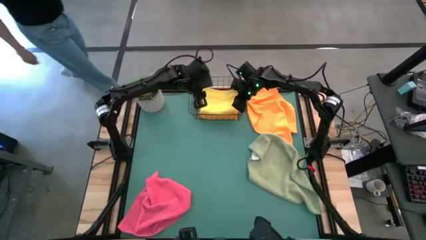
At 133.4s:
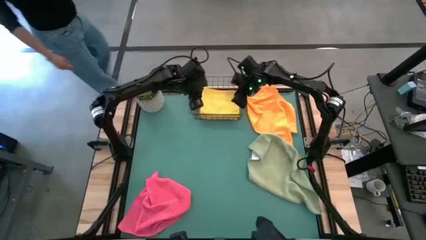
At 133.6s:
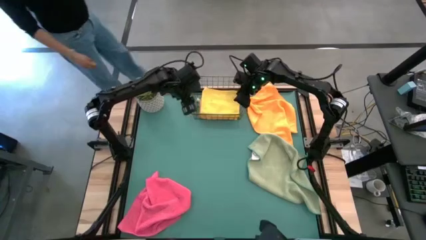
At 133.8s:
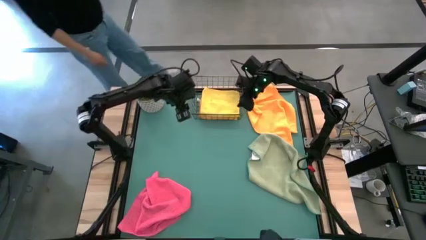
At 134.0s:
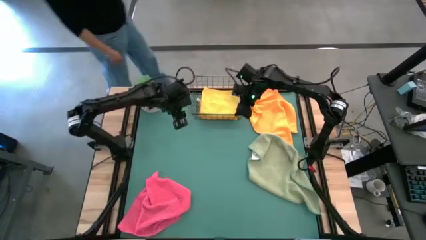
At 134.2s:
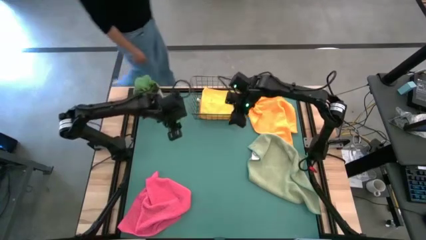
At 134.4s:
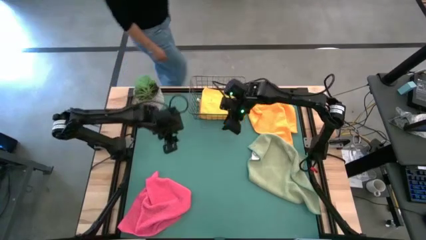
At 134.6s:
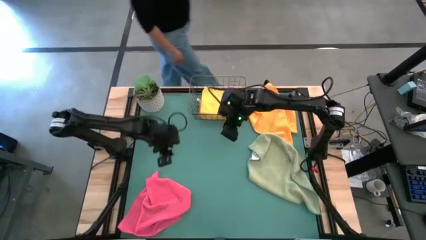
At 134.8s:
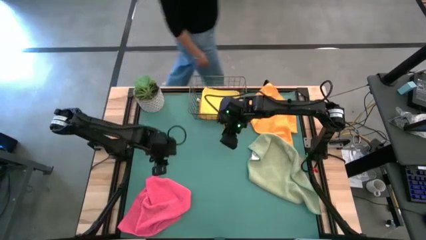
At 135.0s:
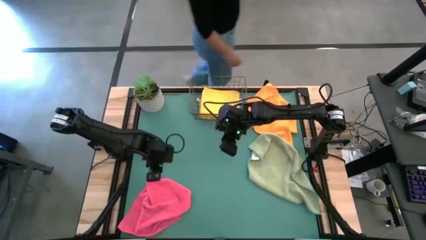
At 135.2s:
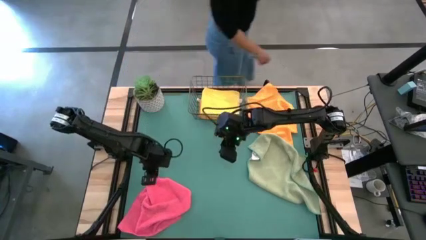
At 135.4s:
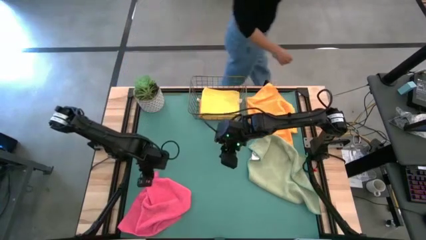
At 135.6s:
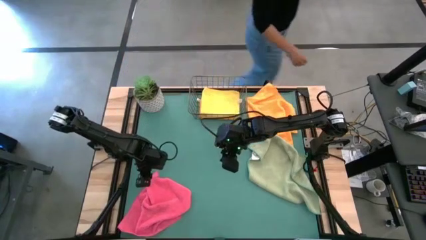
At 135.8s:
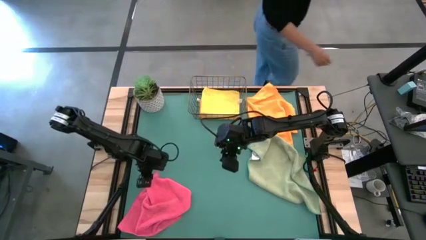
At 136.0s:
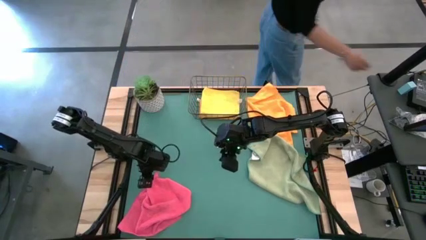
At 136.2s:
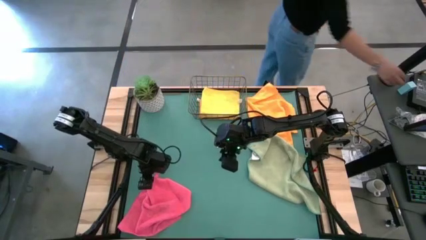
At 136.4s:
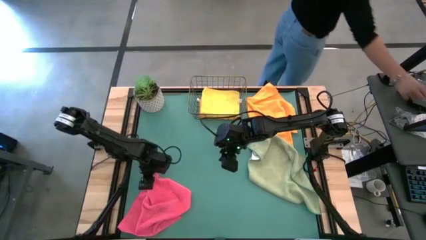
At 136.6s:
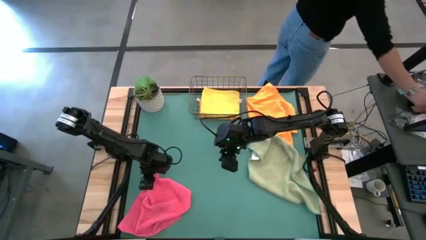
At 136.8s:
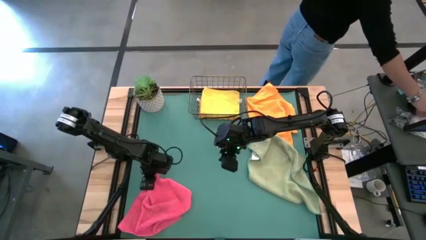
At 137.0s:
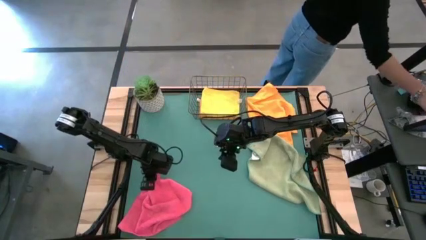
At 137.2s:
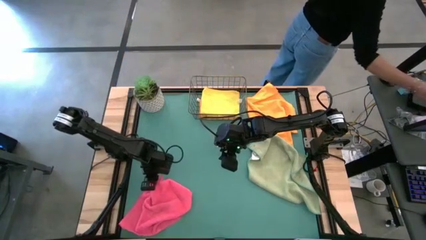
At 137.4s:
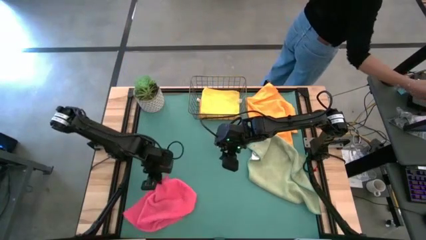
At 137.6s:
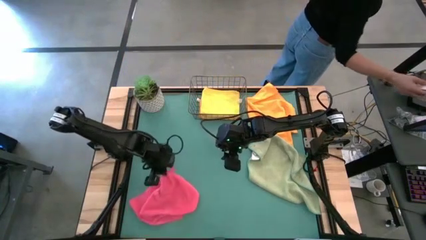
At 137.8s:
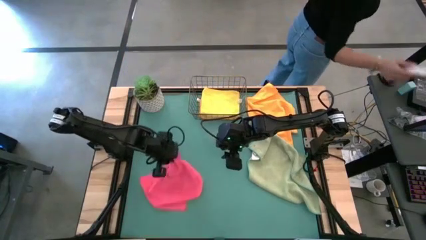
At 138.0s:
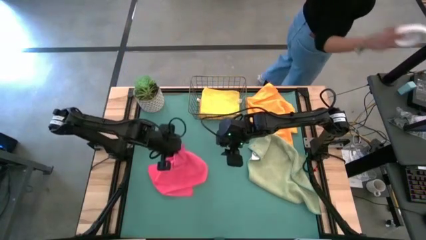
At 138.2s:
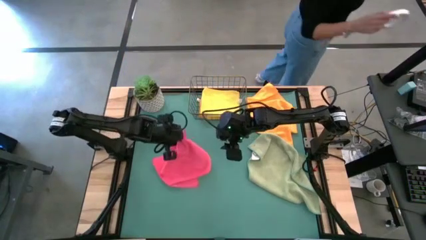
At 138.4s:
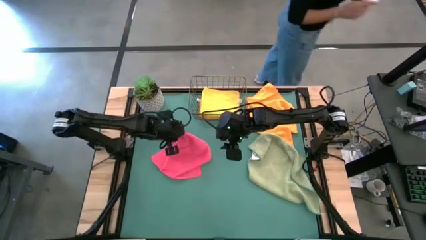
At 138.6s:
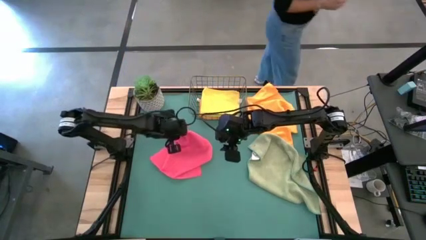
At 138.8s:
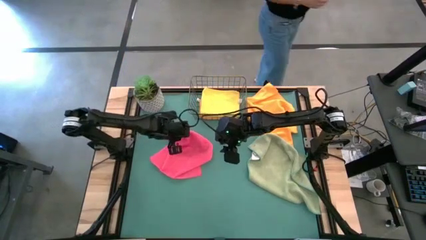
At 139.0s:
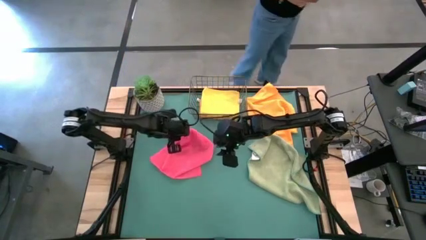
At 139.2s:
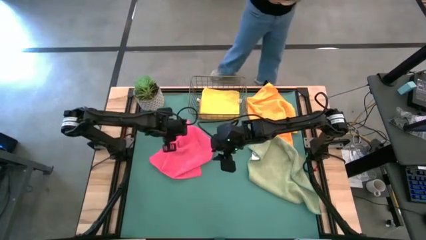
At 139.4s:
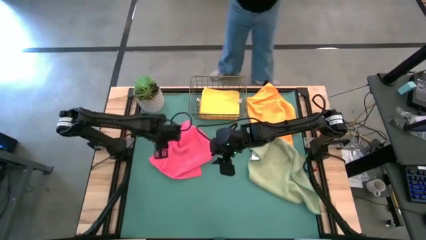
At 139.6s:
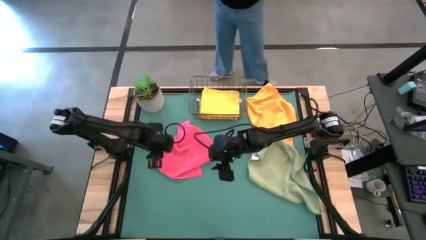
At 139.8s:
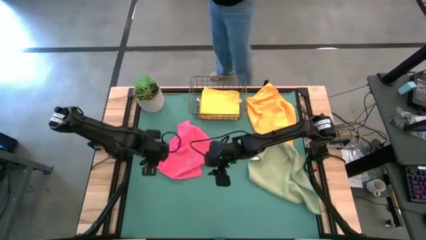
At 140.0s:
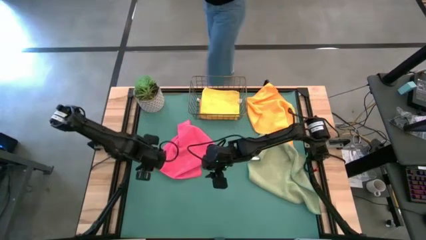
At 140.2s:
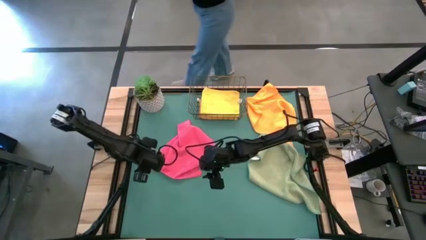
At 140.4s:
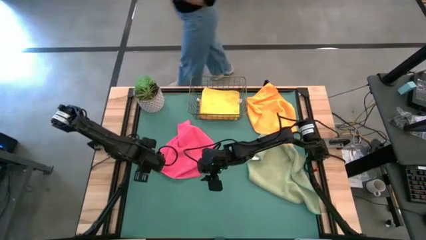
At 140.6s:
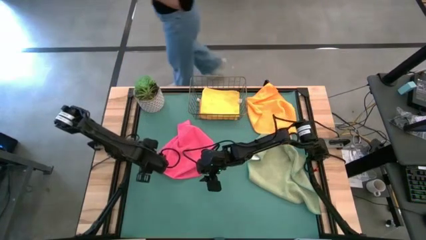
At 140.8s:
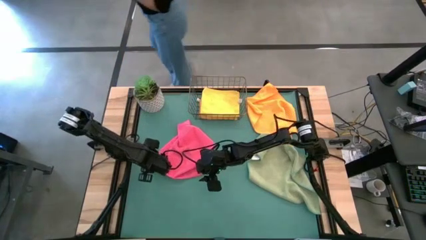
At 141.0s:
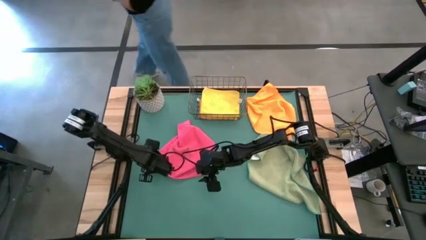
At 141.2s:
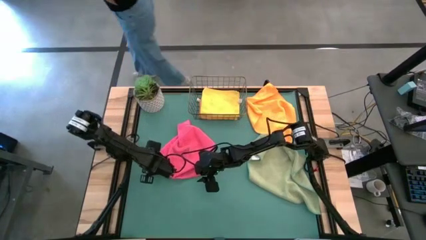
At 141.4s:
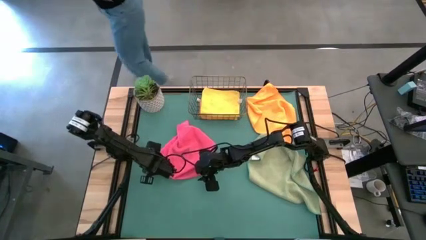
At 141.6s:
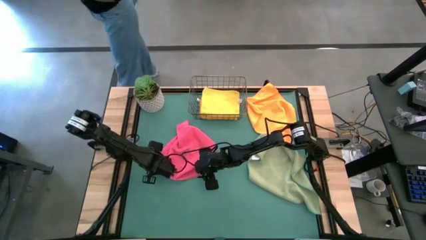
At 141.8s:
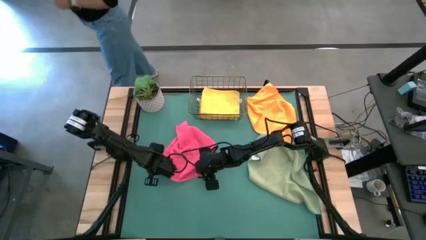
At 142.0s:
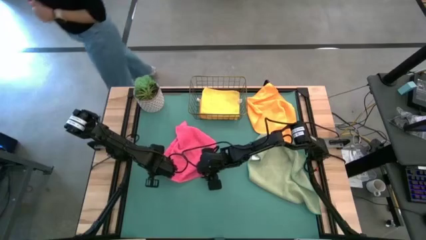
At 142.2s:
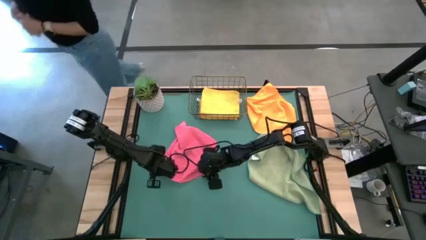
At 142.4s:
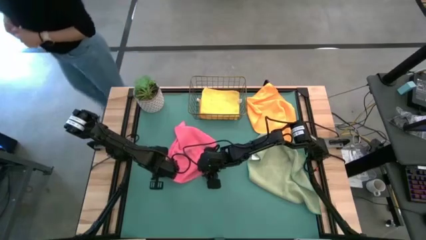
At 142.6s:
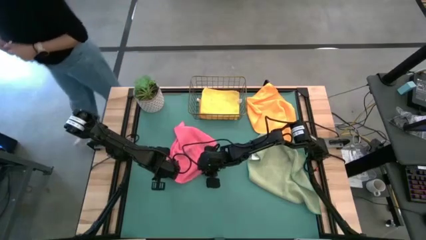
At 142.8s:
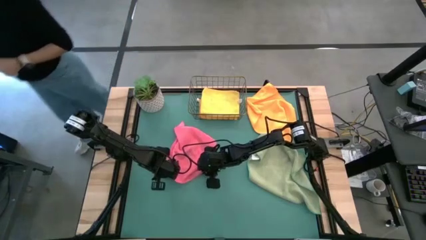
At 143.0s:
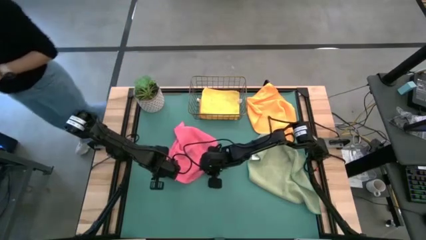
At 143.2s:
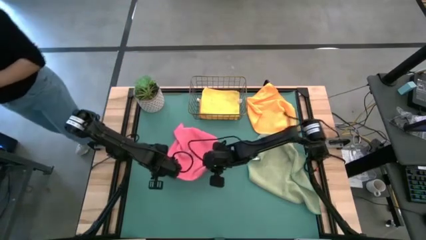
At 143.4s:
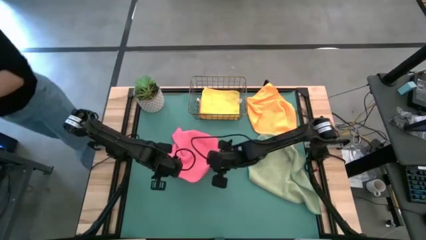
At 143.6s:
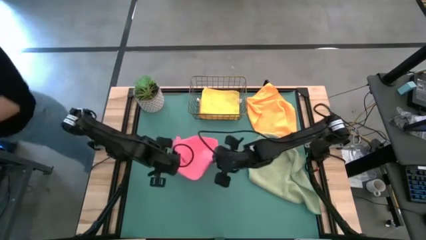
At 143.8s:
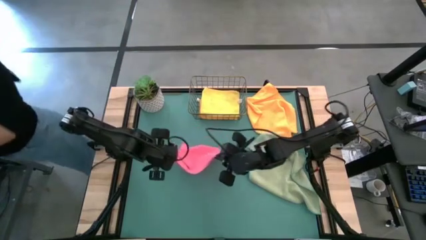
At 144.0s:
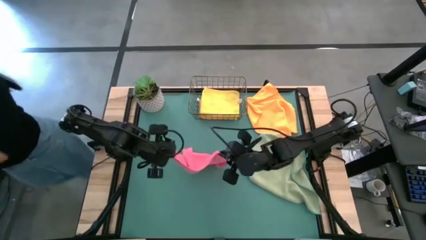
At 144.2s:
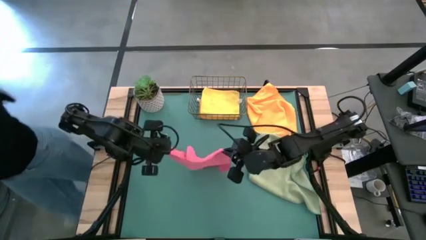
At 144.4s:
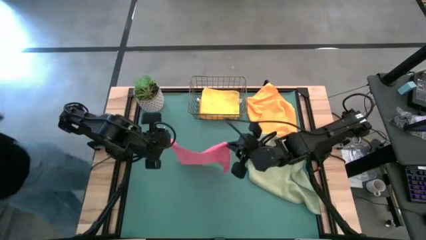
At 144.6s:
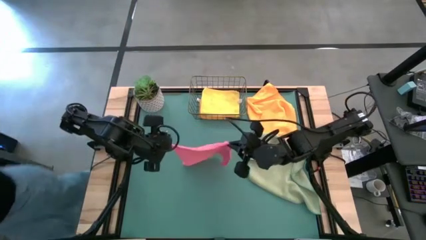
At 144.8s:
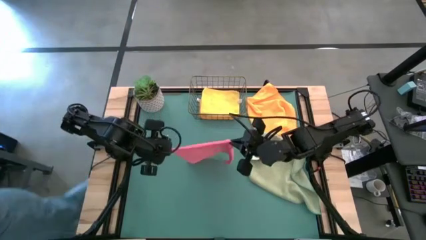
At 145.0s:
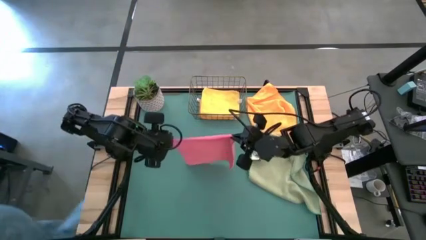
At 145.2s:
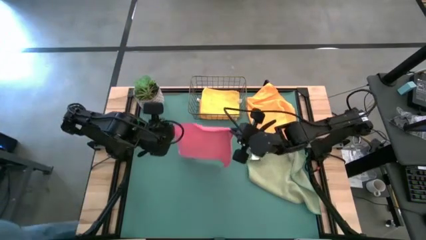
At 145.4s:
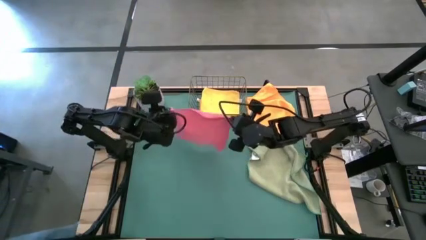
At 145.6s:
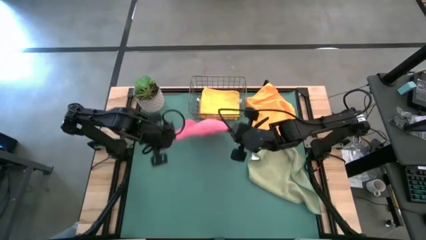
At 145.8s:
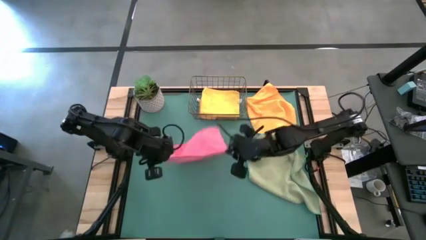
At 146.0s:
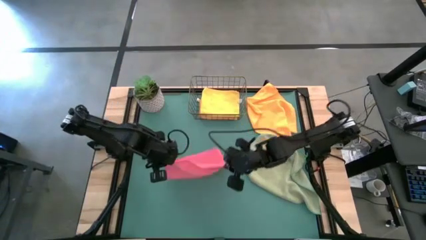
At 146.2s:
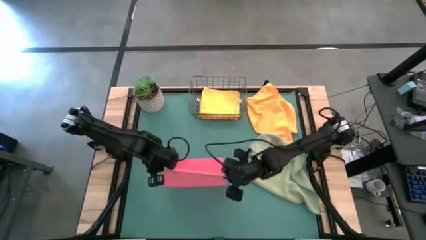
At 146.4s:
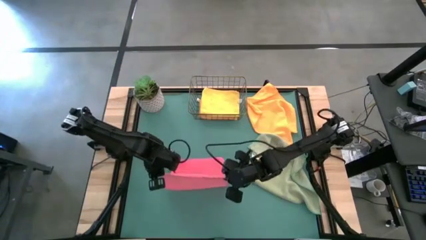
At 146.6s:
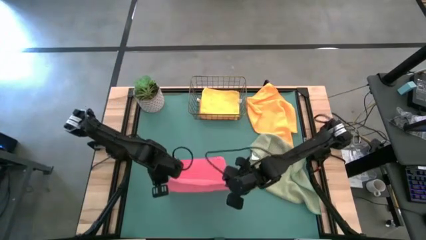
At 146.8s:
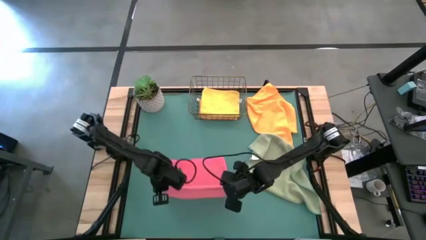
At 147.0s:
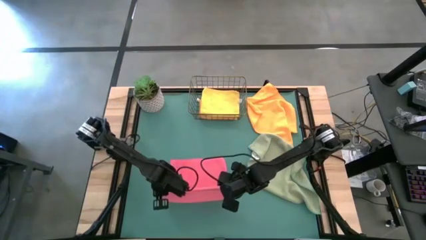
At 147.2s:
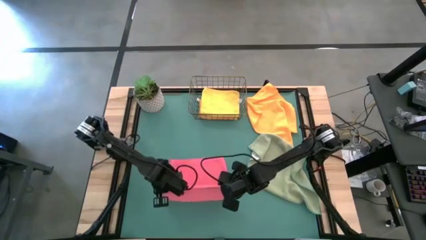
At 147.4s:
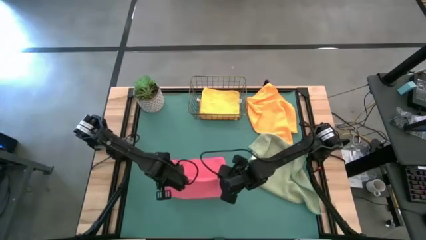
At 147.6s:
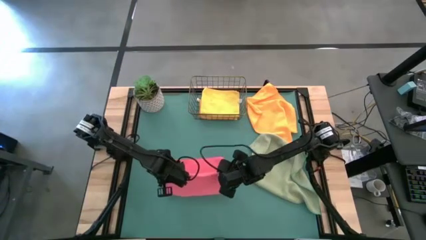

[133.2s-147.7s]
Task: Fold microfiber towels
Fold the pink microfiber cloth
